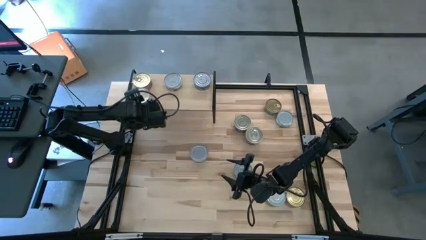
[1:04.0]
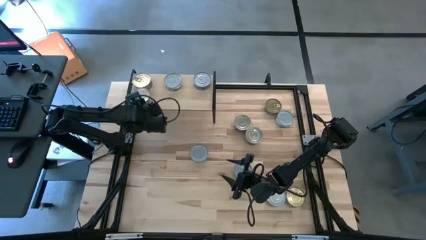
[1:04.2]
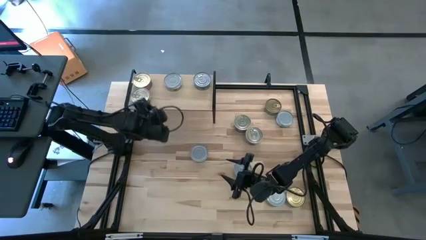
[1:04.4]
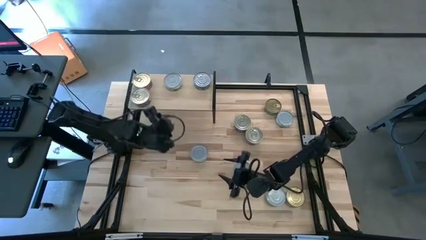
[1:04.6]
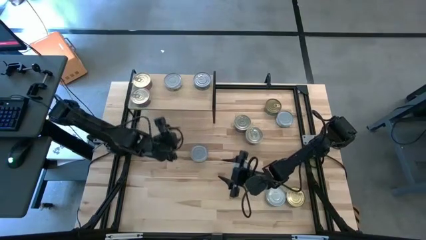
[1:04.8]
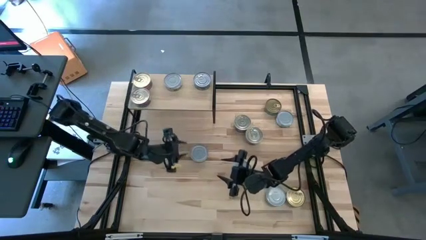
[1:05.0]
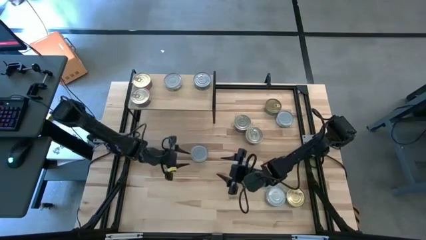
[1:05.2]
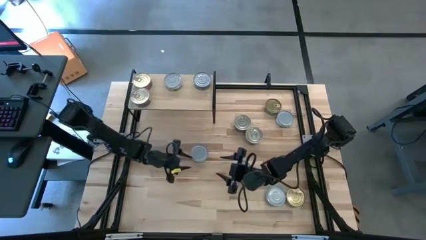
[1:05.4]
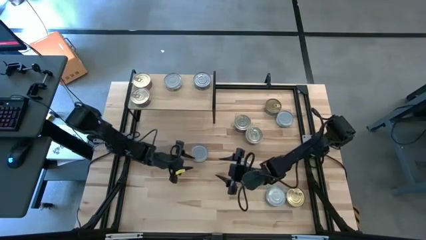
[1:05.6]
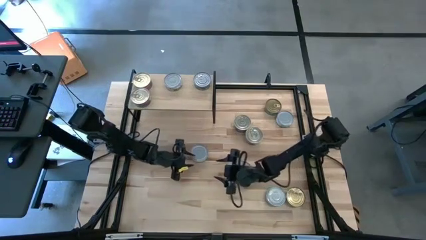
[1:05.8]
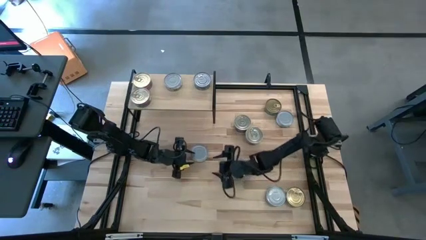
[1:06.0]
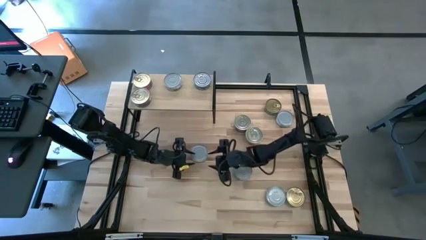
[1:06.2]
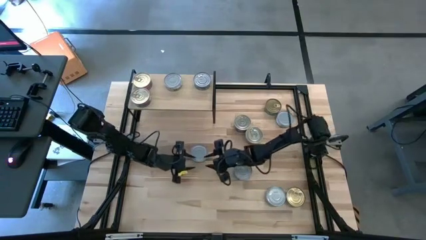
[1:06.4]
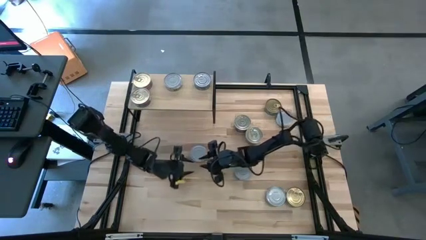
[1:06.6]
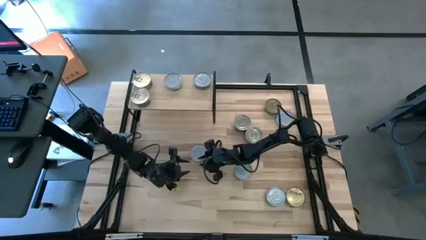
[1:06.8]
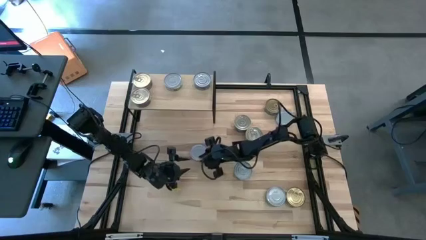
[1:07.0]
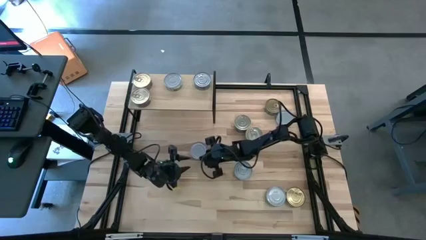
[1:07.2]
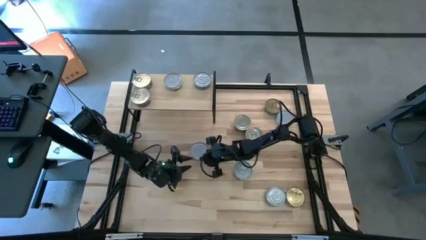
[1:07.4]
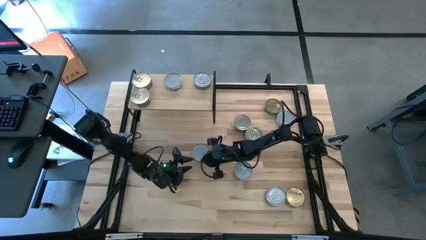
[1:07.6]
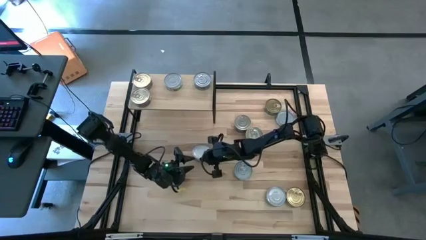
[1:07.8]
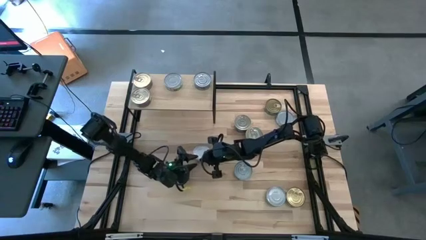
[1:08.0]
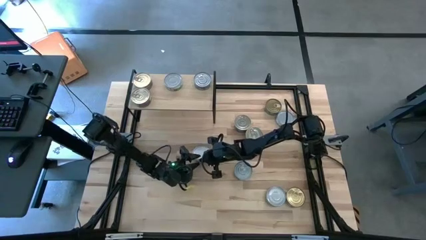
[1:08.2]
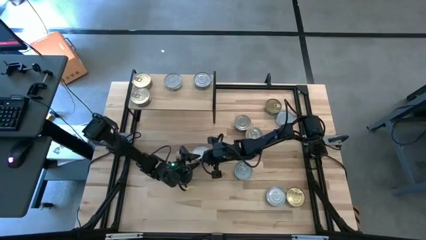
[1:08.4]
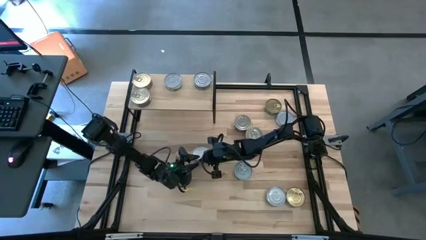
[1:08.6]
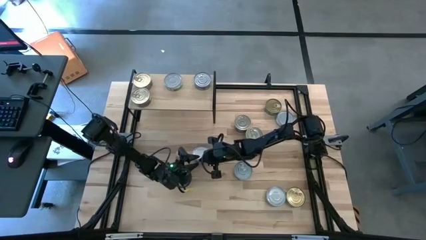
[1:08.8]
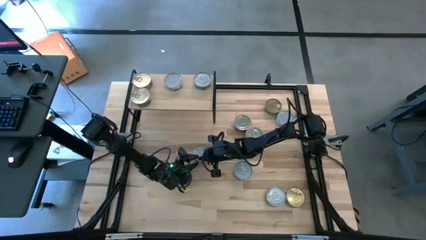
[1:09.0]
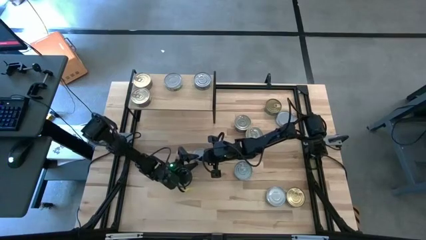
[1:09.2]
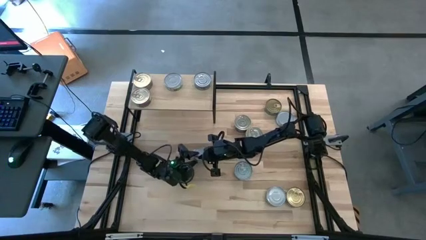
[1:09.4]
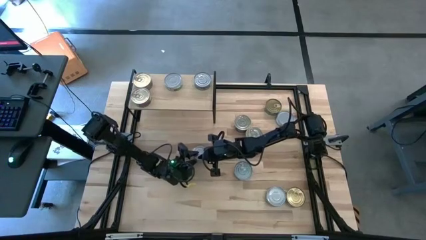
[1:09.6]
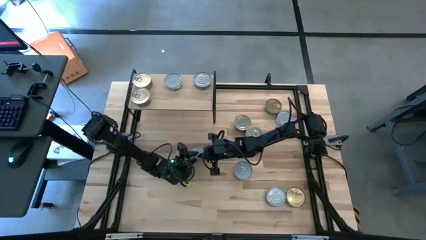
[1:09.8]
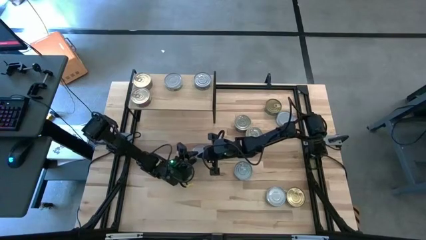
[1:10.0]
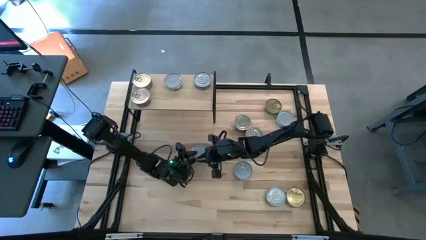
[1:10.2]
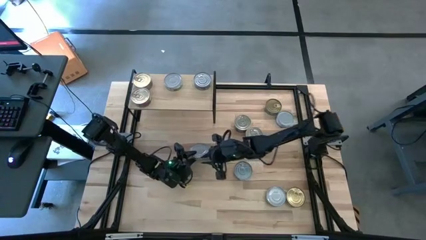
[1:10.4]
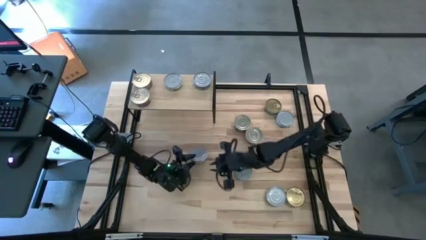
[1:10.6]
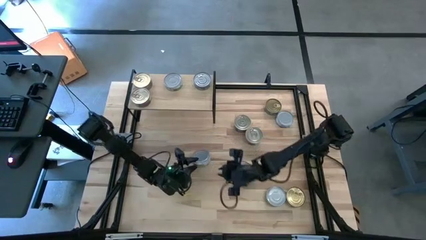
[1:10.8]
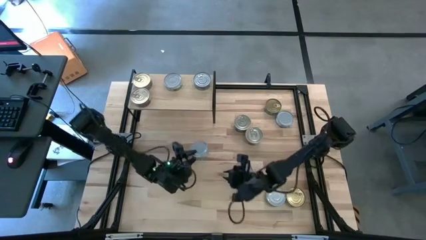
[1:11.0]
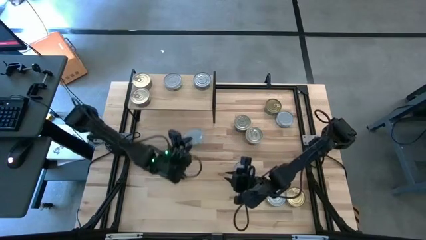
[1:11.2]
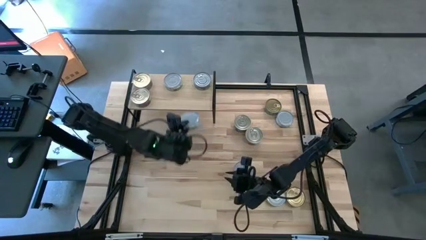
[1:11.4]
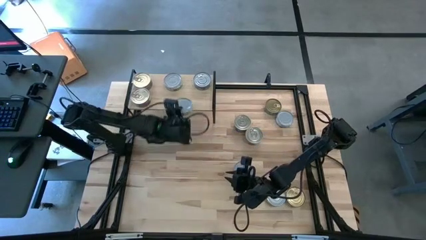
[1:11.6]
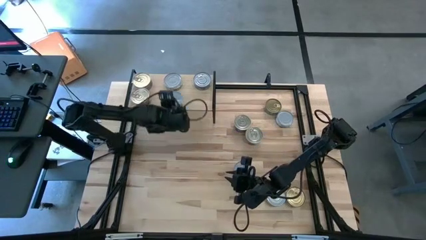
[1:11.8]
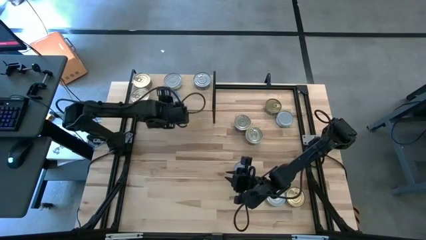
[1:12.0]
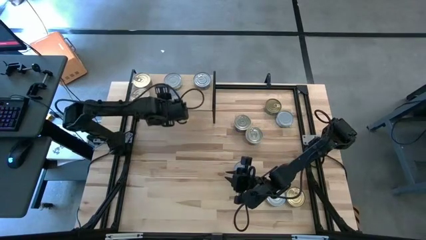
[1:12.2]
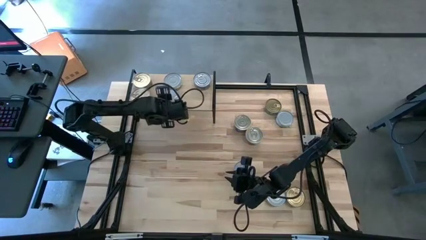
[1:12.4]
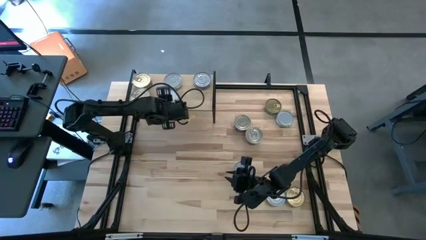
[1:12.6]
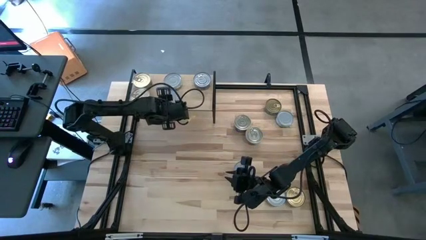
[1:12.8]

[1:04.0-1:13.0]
Task: Stack canned seafood by type on shelf
Put the green white tuna can on the shelf aligned with the other green white tuna can

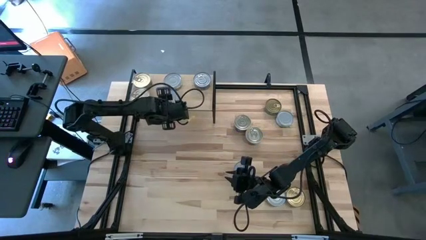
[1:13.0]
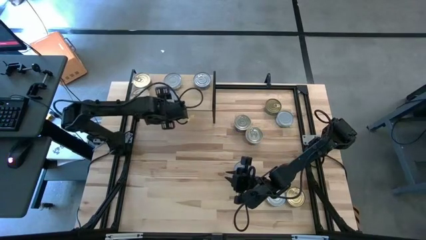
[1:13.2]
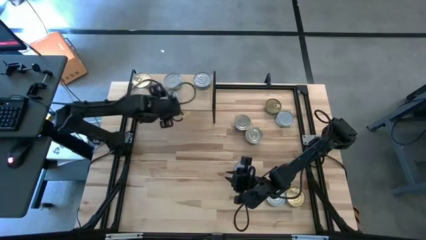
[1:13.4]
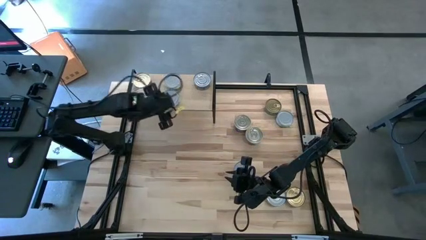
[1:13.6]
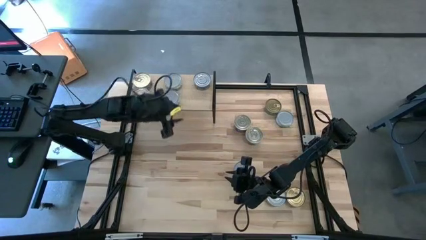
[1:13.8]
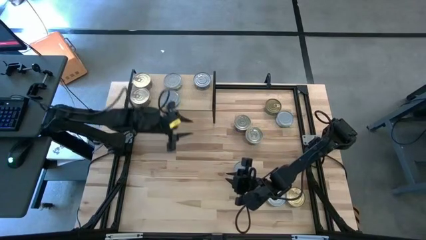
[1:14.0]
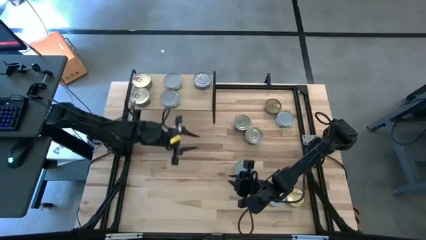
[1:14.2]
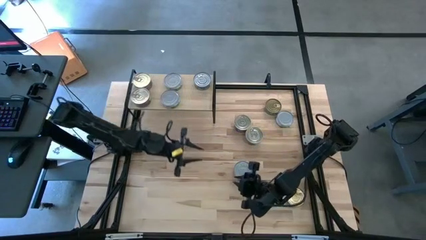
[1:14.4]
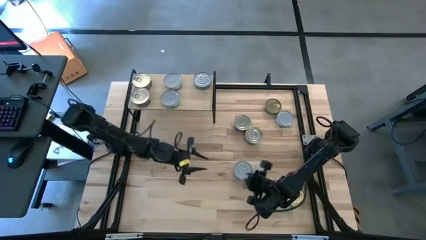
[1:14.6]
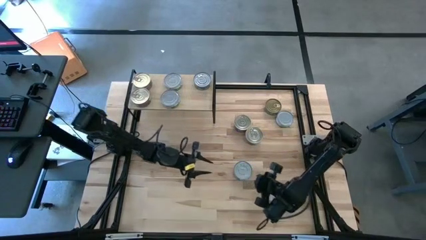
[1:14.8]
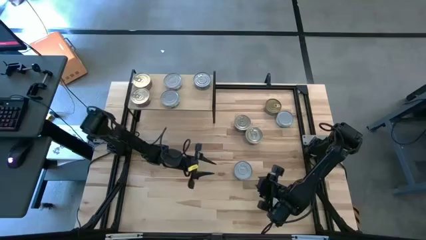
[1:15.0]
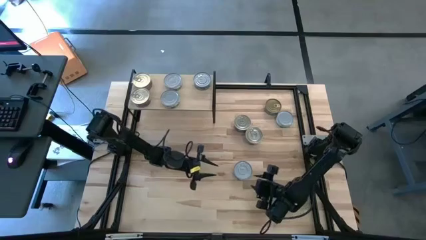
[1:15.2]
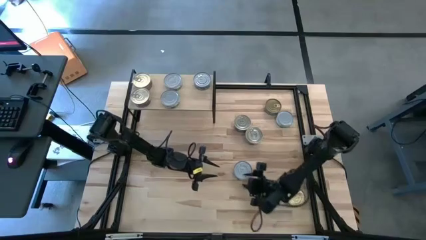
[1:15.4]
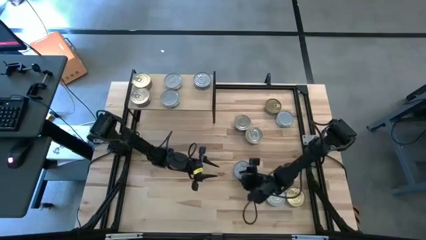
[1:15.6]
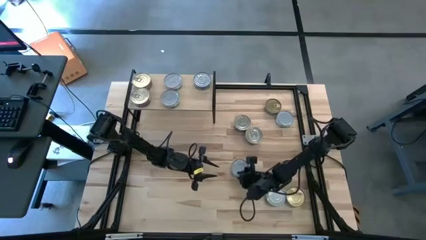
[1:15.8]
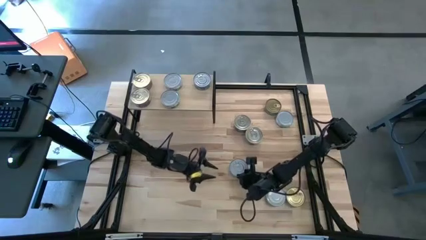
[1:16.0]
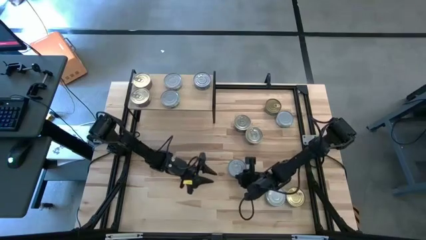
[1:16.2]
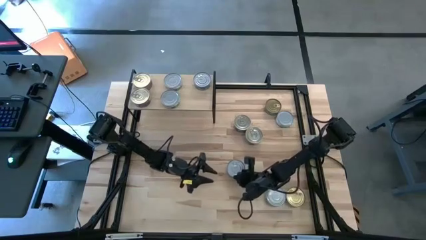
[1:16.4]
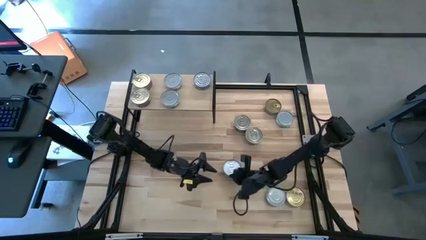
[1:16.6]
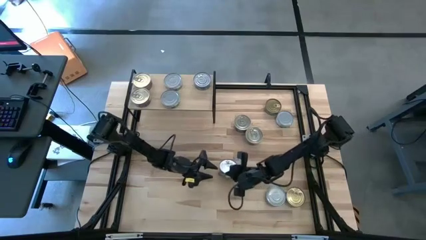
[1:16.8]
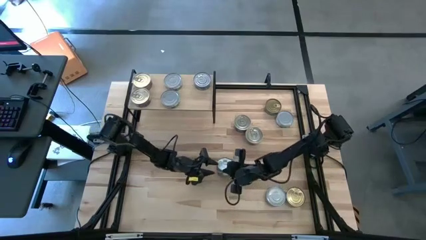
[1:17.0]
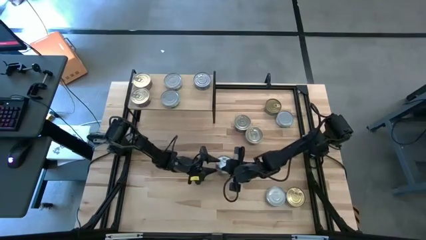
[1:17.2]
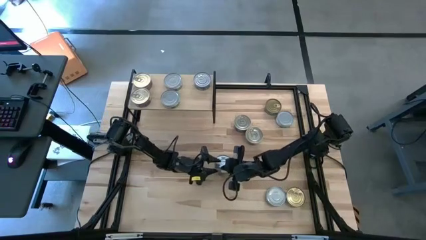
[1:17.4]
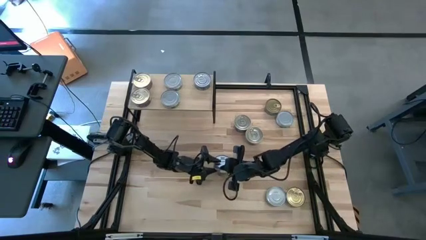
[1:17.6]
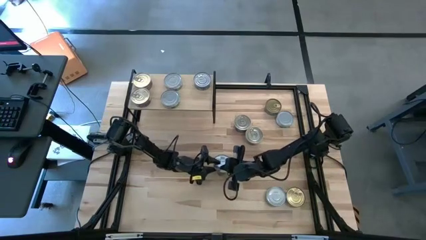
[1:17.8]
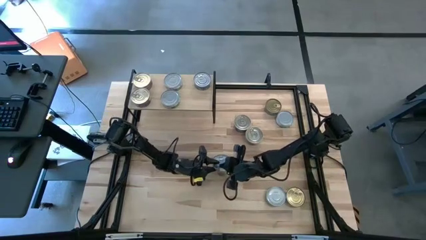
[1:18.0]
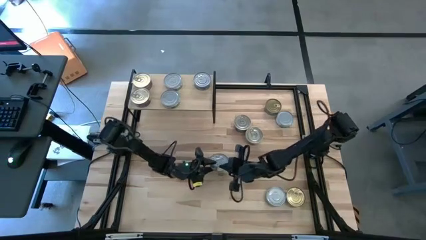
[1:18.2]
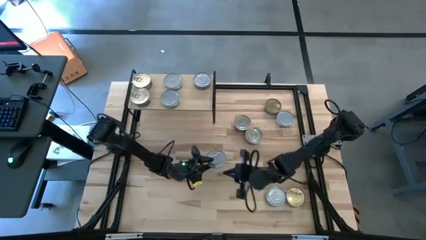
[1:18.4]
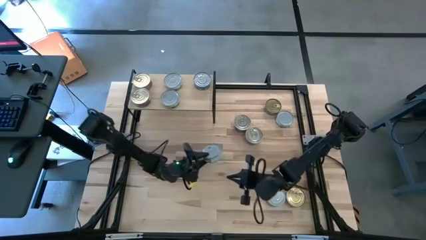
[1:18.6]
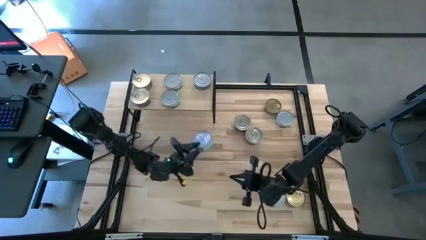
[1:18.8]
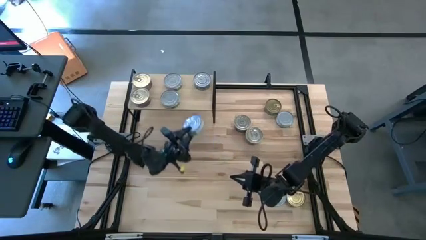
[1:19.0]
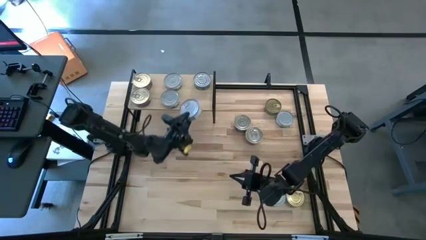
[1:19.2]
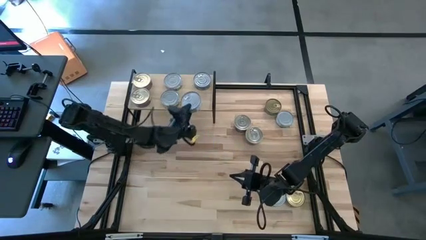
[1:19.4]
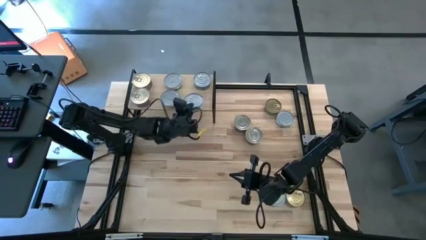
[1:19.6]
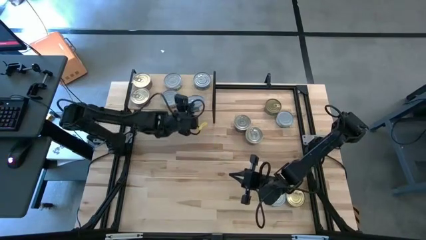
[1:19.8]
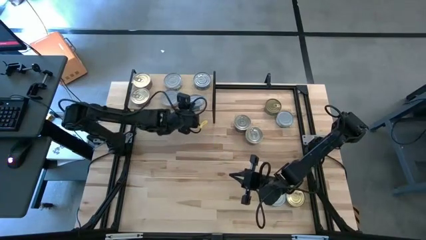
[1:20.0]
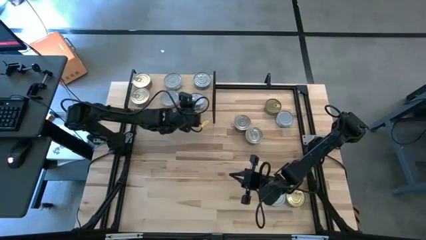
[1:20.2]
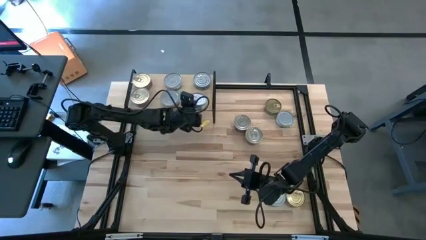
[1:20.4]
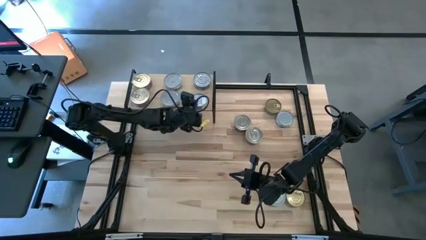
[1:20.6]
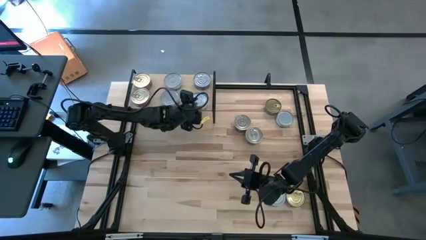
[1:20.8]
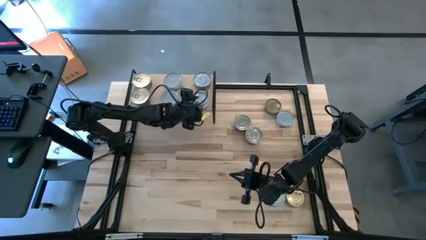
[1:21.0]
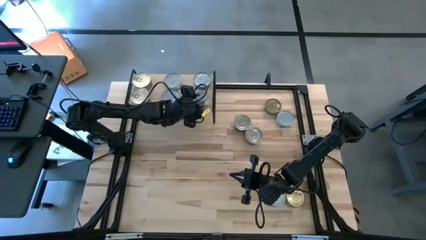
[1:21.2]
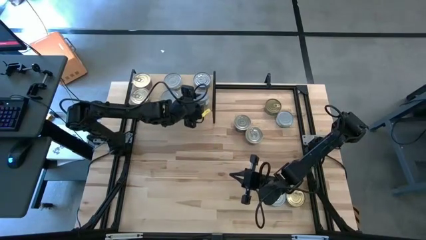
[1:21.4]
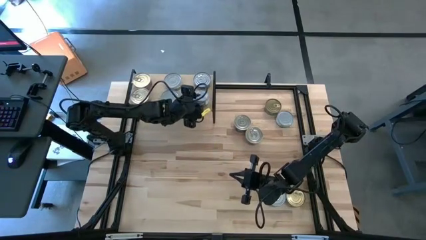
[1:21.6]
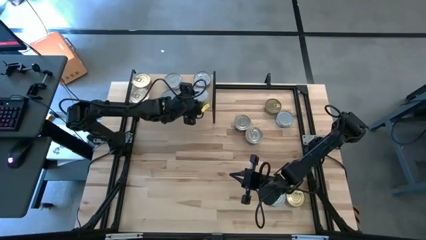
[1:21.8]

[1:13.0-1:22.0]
Put the green blue tuna can on the shelf aligned with the other green blue tuna can
